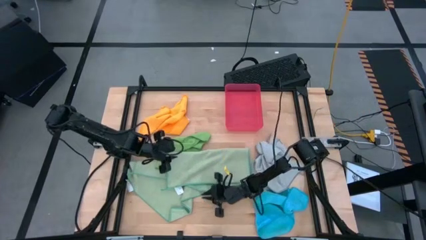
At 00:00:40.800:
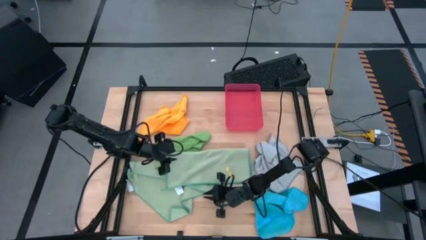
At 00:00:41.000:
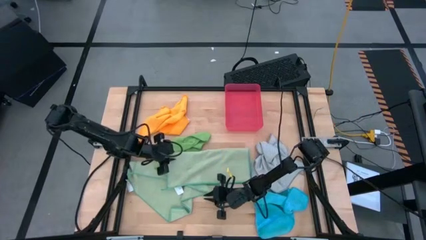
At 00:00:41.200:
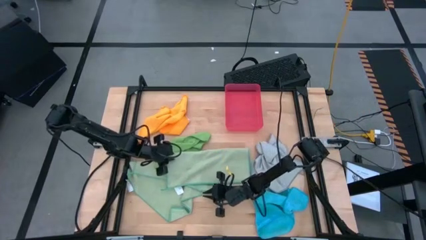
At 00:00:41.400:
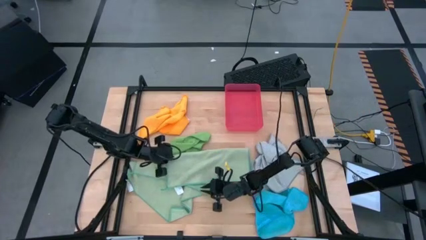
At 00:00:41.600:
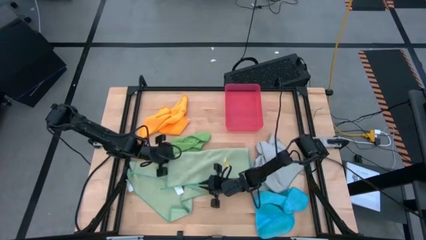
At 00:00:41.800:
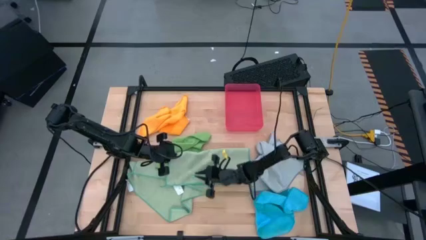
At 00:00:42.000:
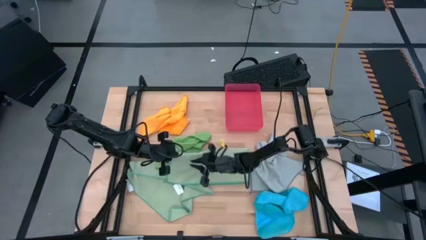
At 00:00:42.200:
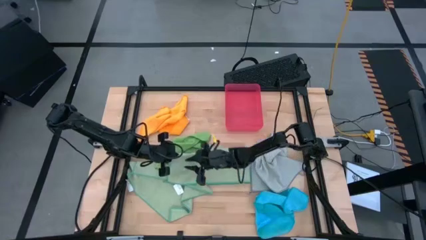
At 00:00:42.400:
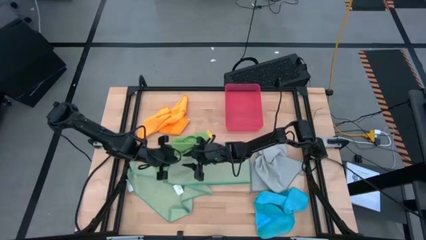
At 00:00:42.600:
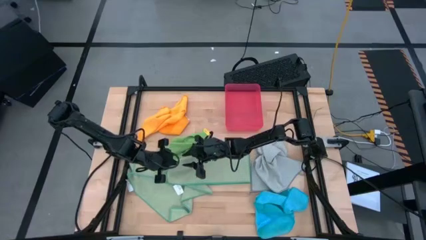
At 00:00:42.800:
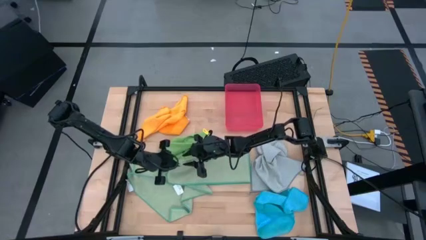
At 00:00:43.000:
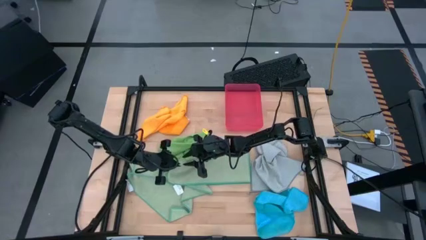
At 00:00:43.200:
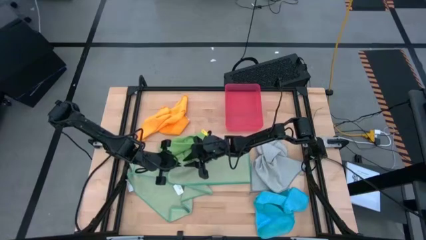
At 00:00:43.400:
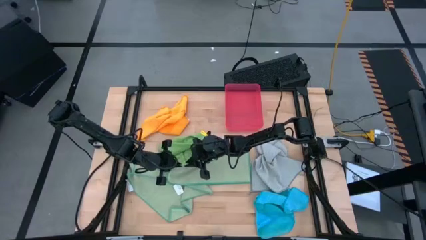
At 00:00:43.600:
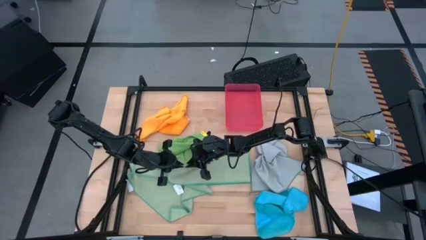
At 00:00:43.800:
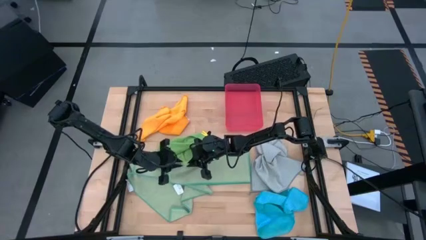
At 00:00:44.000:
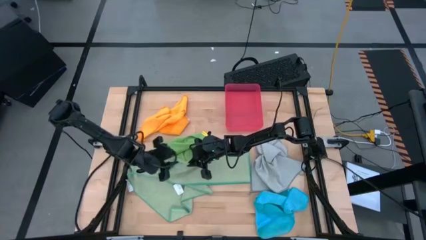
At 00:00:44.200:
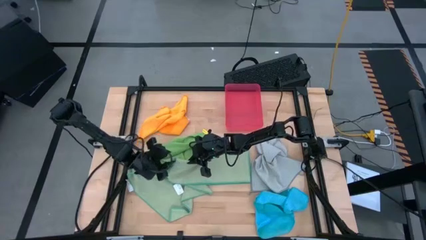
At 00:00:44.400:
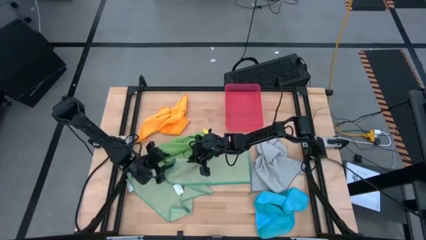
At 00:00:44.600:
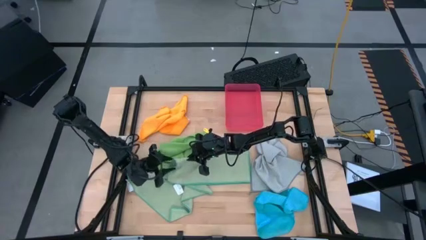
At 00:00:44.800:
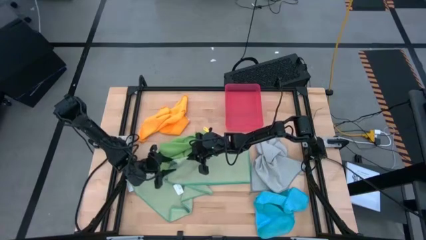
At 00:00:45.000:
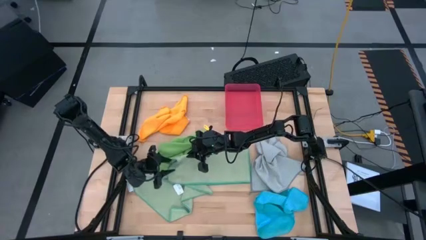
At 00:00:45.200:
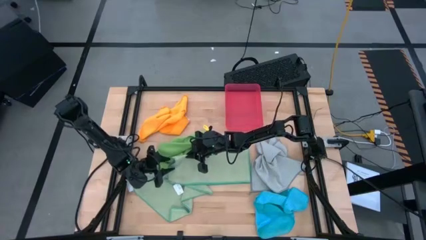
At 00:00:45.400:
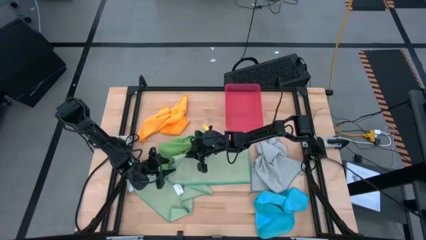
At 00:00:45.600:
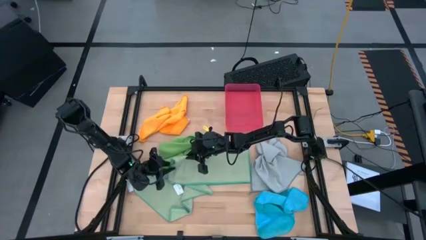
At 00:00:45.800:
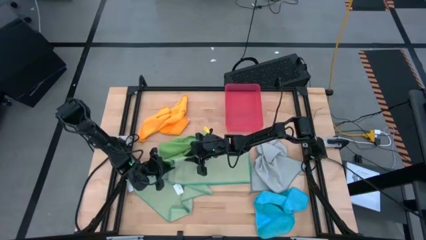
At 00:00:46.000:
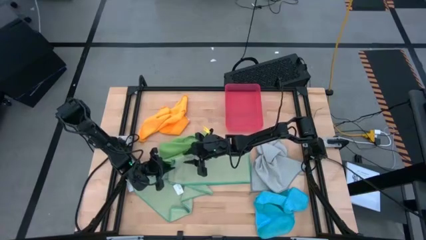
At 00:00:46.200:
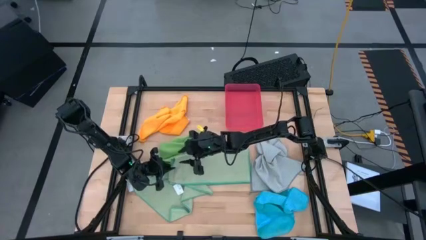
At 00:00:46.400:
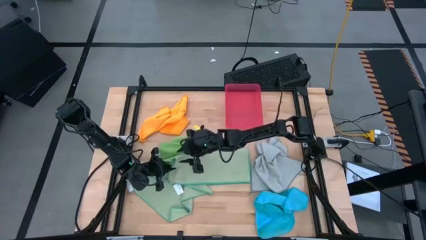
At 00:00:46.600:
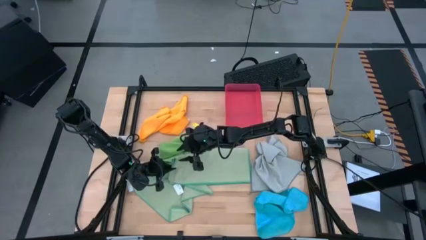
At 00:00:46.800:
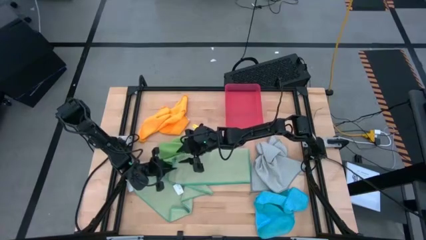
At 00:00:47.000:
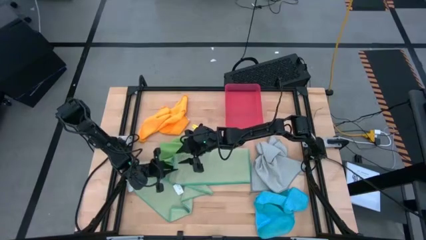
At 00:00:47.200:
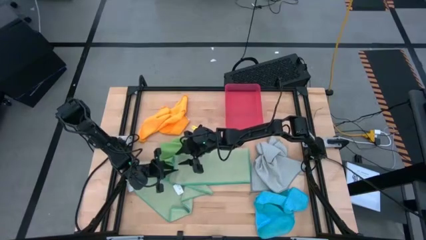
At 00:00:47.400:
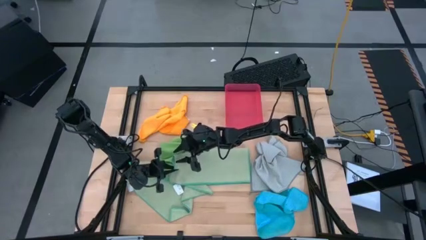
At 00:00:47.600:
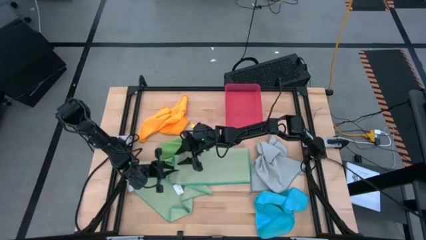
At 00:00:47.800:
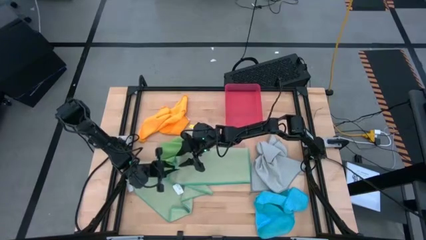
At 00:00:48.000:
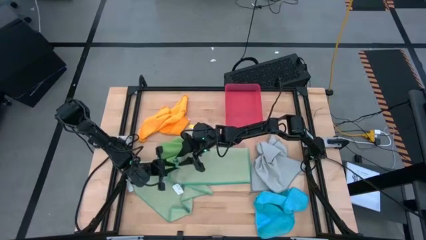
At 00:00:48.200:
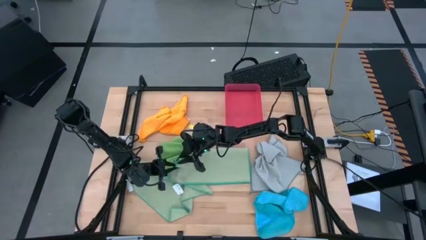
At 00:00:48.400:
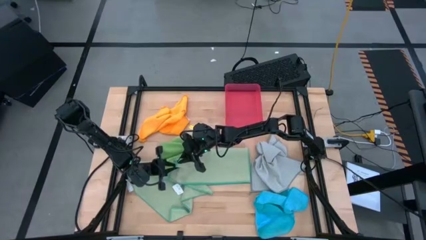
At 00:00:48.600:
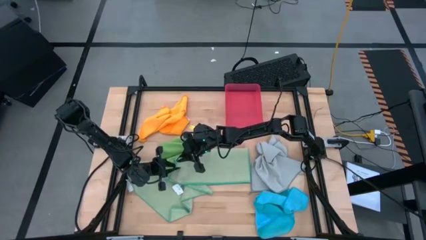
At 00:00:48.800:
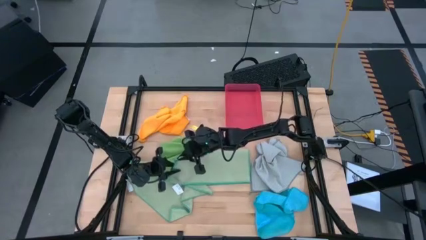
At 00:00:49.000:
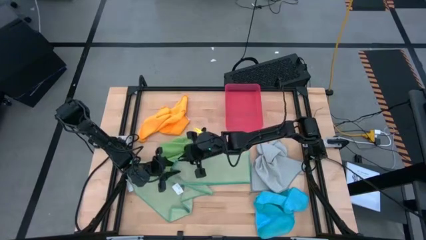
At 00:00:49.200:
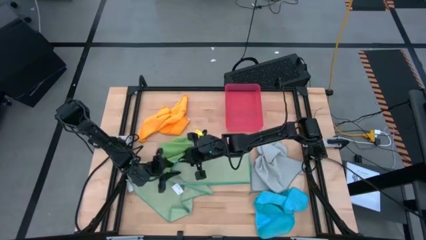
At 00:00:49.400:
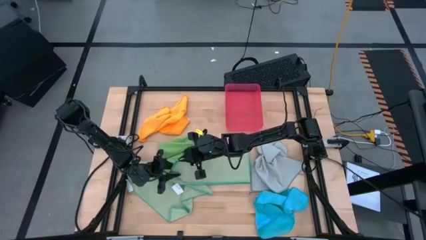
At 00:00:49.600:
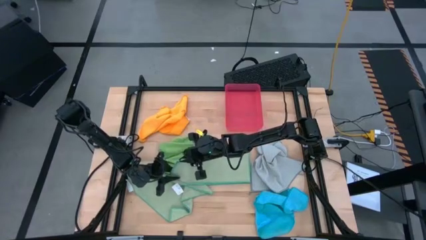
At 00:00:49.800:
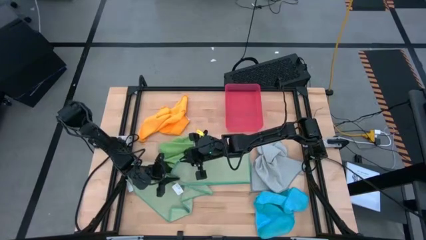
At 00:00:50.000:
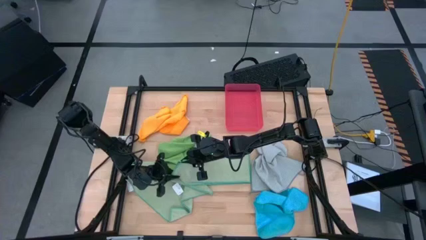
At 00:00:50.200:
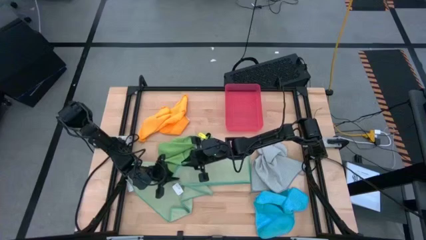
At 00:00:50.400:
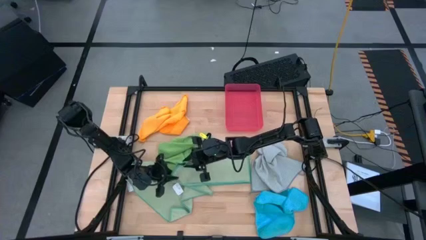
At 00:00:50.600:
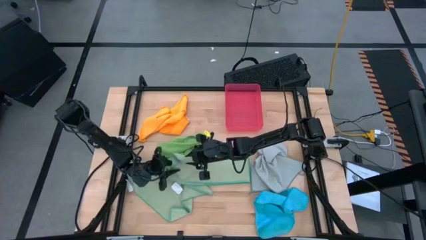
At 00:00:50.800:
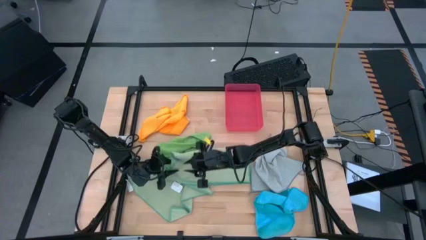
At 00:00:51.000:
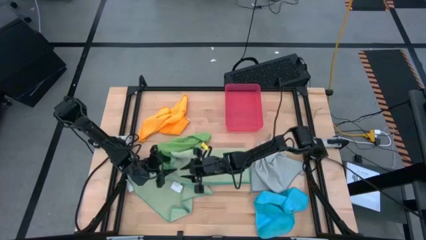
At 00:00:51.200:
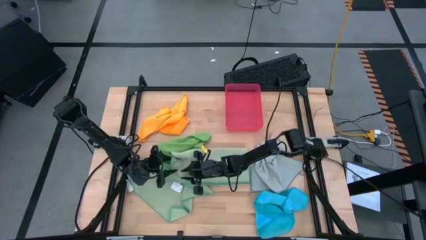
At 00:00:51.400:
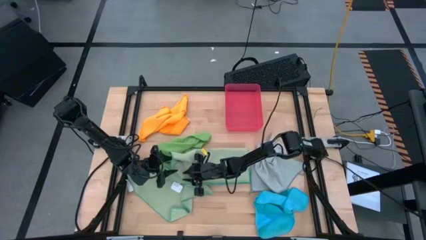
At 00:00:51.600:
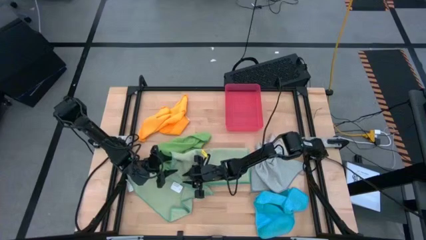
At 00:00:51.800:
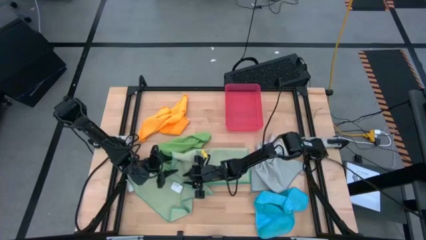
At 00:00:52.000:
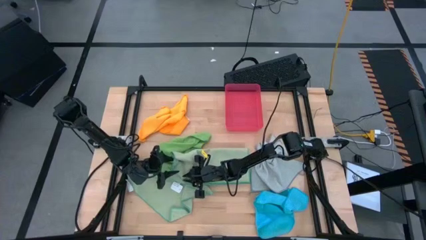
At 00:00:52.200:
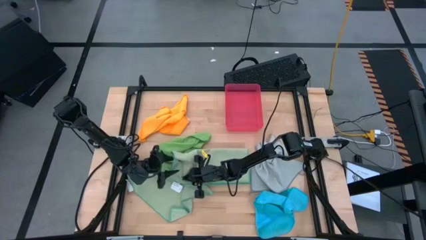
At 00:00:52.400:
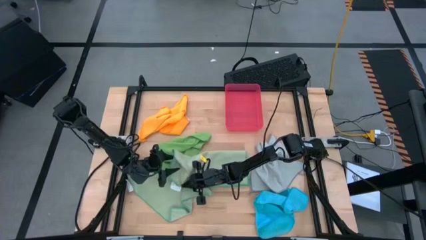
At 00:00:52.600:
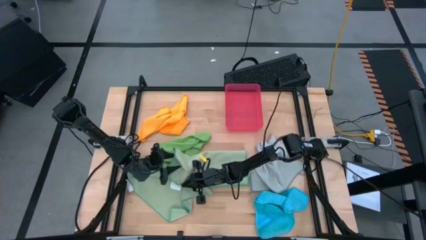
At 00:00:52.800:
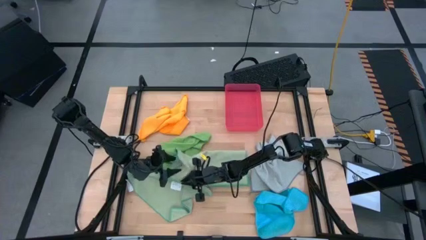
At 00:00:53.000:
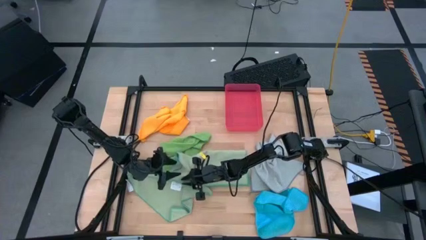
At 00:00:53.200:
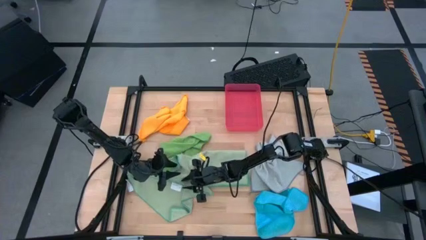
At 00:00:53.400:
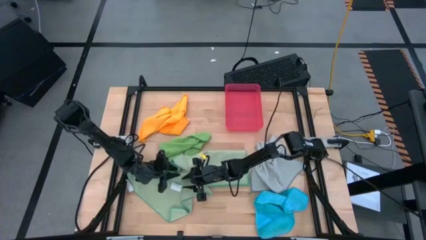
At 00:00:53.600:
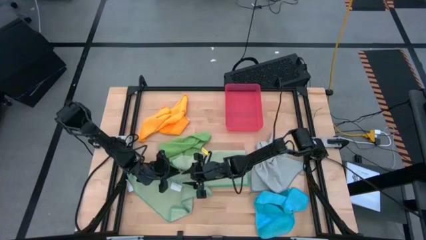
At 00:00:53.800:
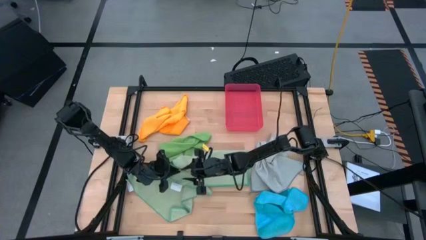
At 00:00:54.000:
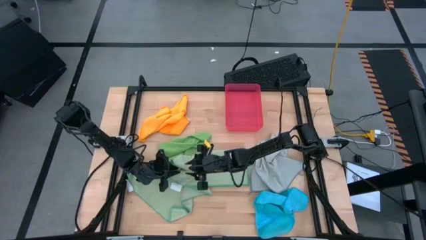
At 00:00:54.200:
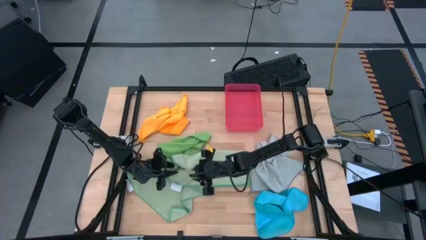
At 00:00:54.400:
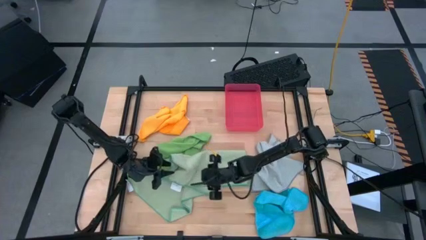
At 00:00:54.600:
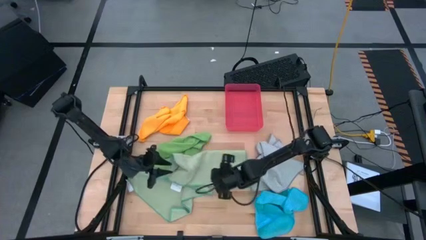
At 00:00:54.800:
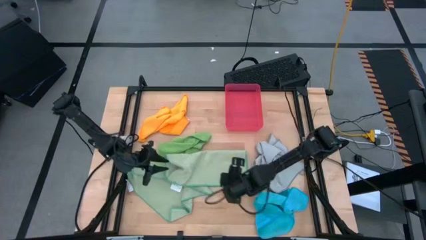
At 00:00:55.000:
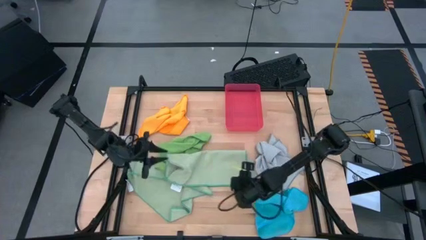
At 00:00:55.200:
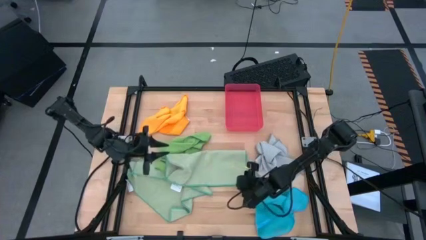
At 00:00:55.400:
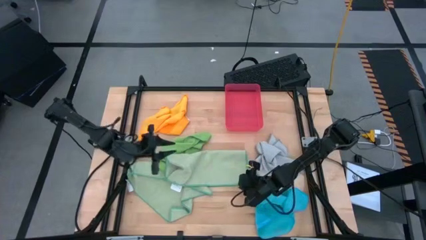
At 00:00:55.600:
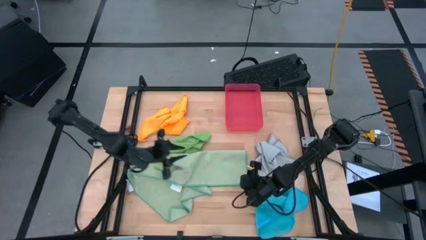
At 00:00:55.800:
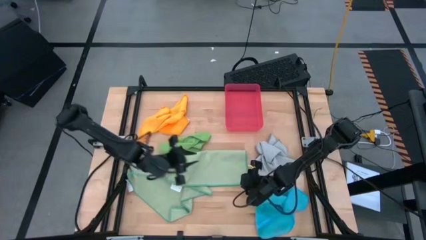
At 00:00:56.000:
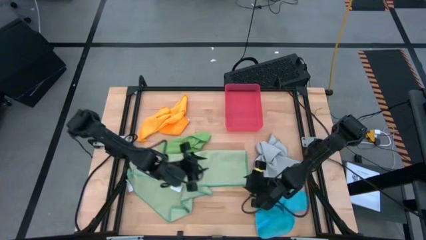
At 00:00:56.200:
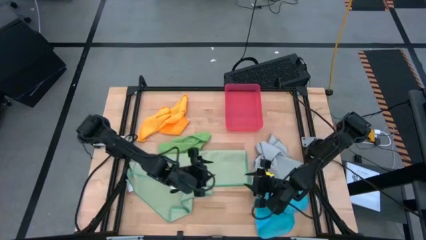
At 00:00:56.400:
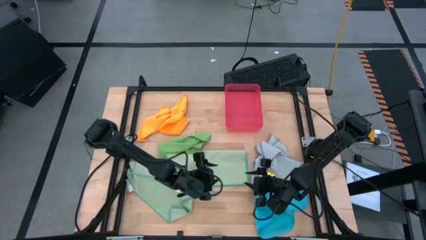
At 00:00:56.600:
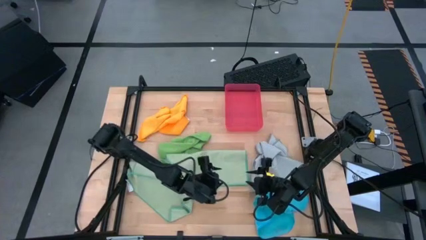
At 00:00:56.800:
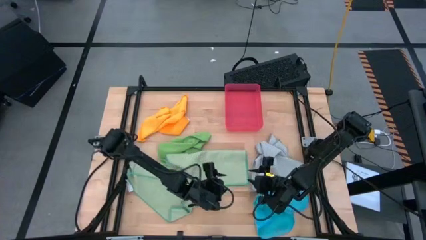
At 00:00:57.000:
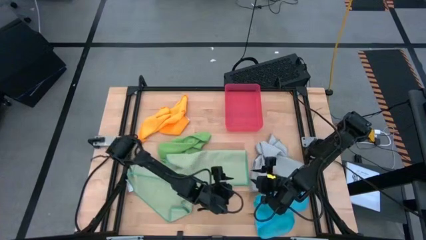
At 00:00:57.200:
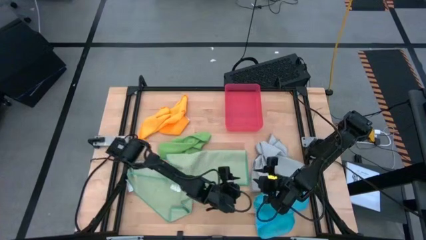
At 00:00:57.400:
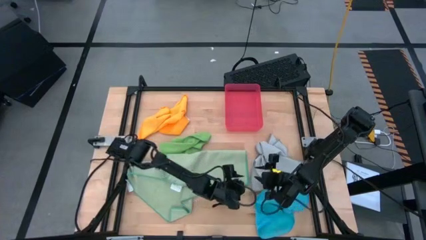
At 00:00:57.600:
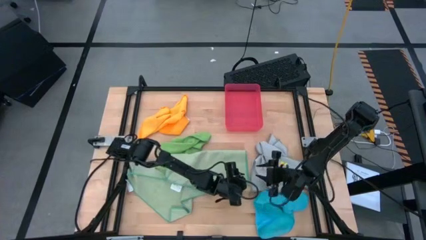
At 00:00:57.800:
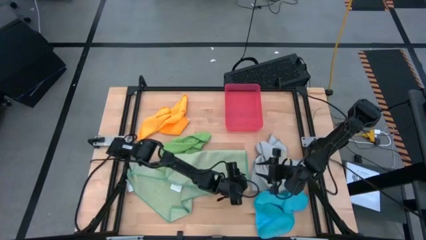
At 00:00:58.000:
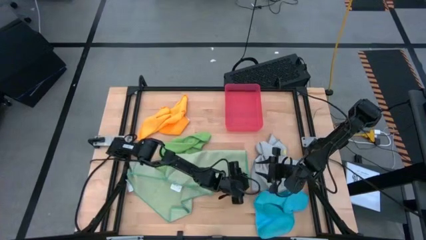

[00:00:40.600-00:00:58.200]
Task: Fold microfiber towels
Fold the right light green microfiber cloth
